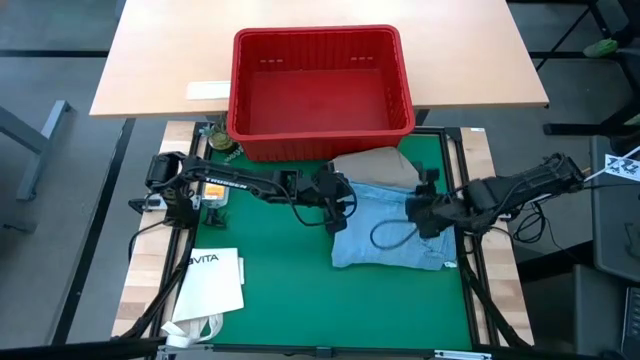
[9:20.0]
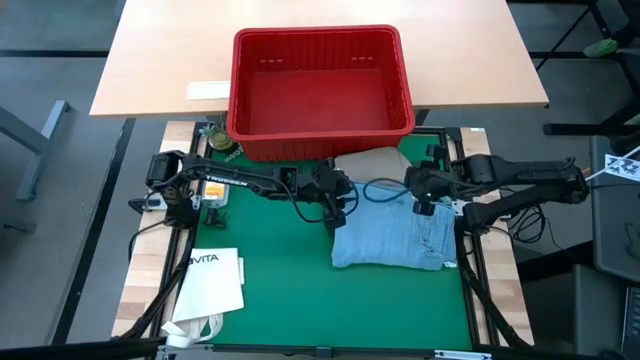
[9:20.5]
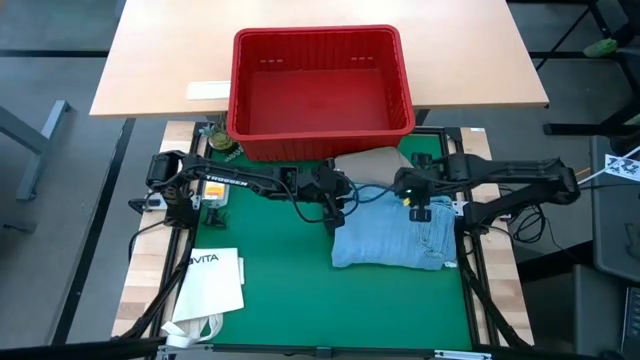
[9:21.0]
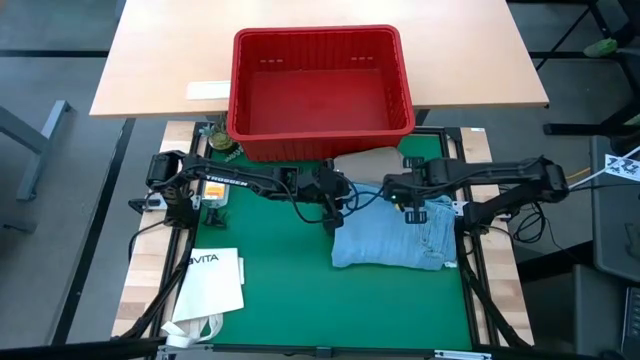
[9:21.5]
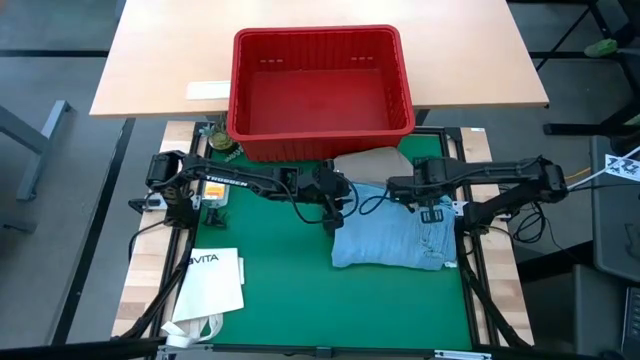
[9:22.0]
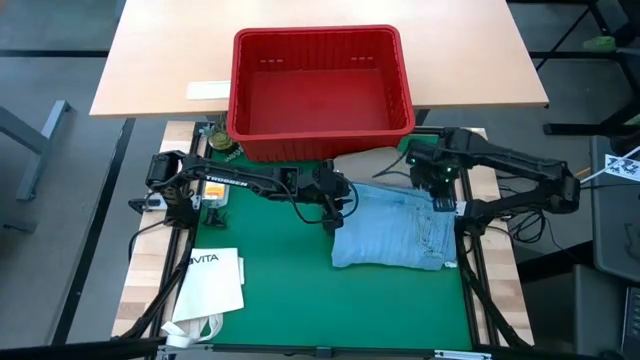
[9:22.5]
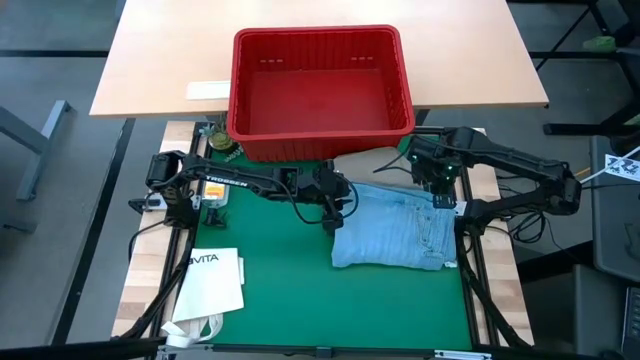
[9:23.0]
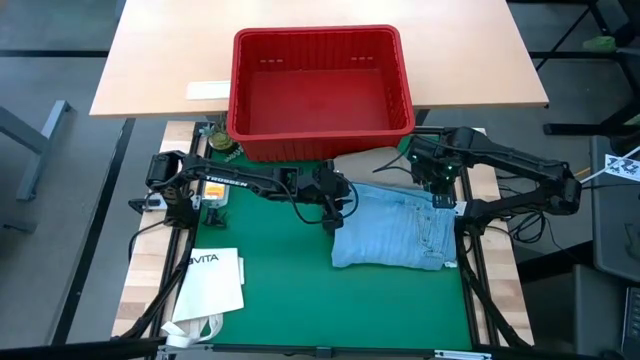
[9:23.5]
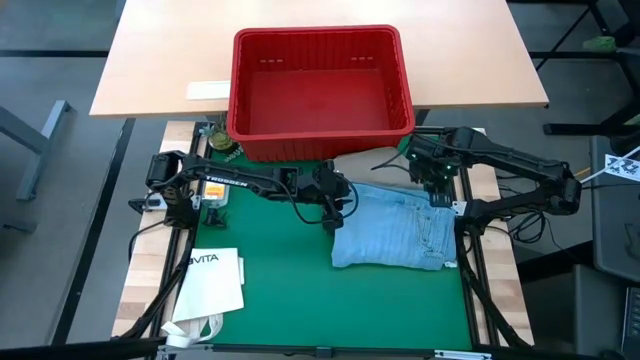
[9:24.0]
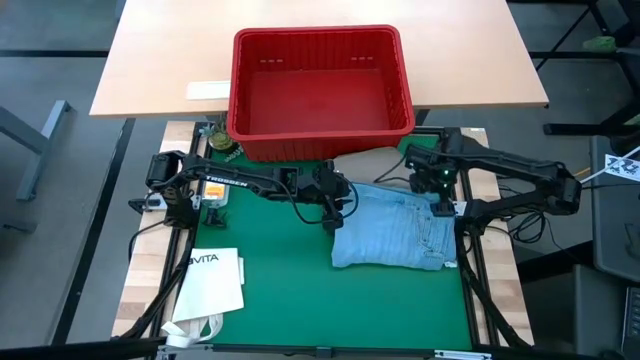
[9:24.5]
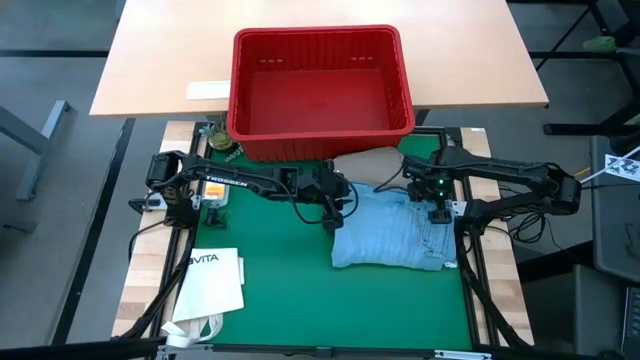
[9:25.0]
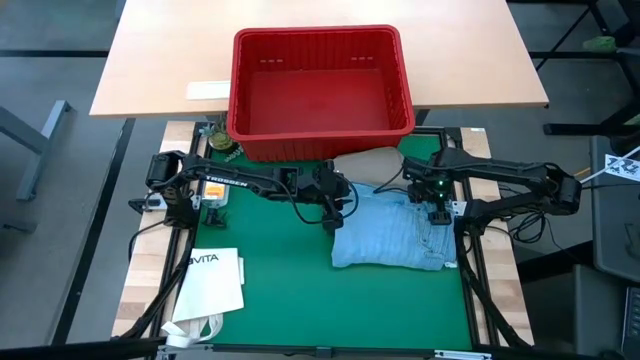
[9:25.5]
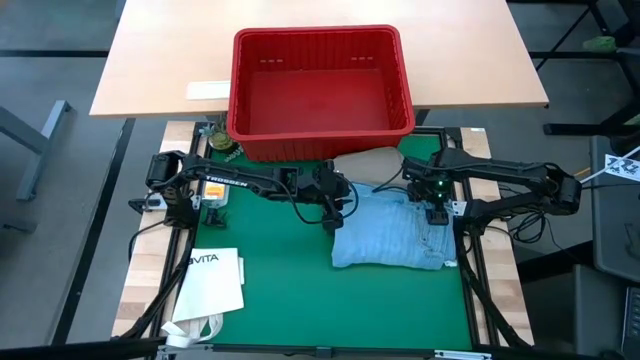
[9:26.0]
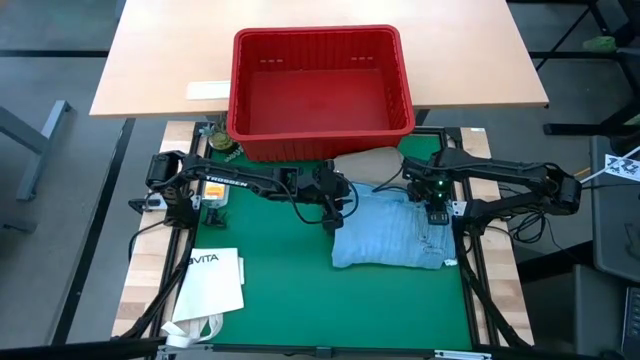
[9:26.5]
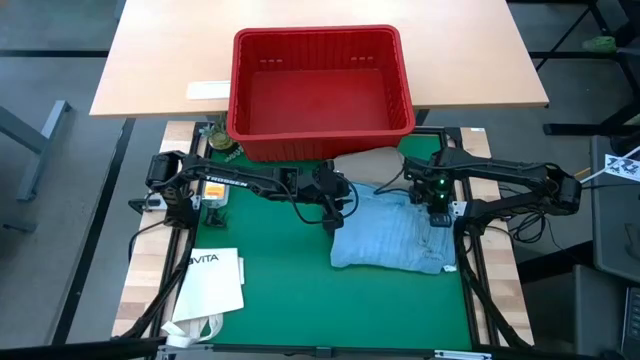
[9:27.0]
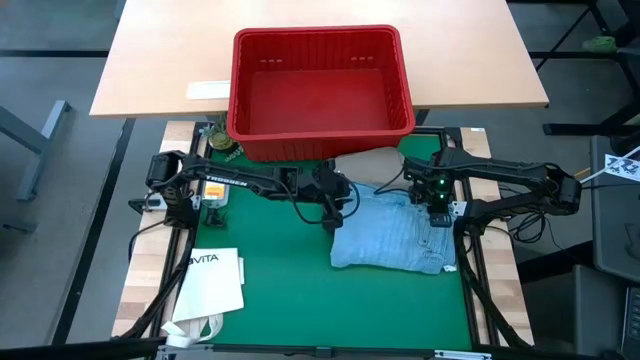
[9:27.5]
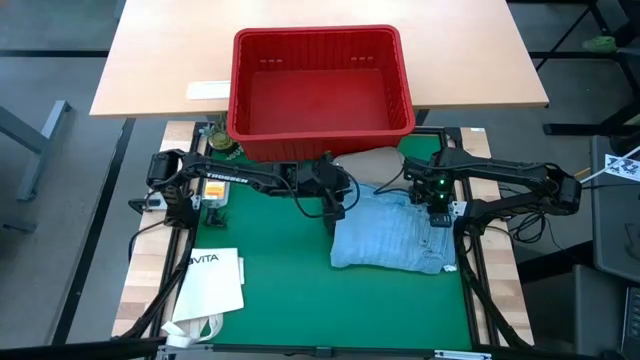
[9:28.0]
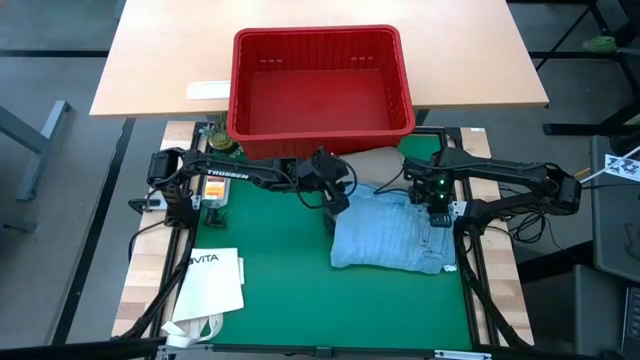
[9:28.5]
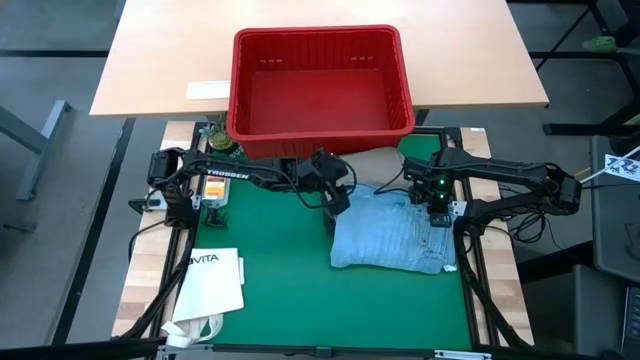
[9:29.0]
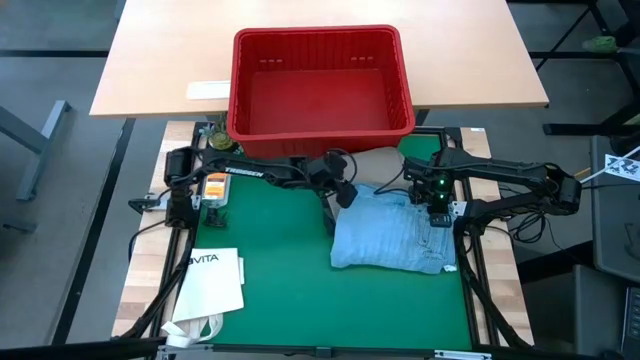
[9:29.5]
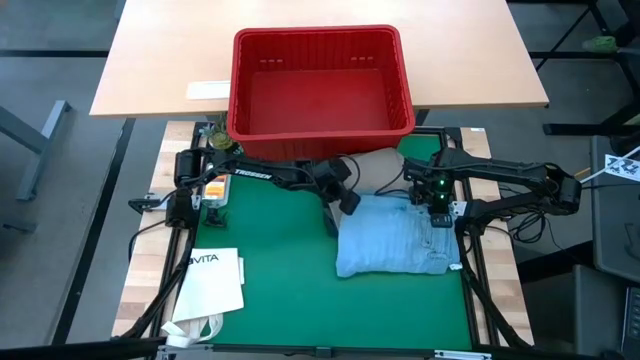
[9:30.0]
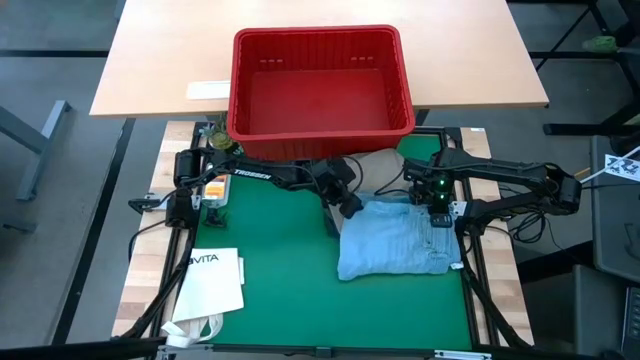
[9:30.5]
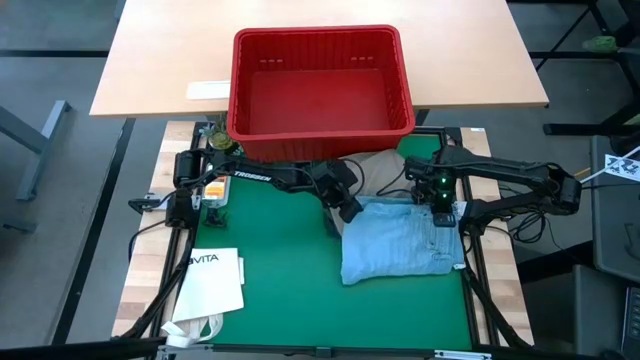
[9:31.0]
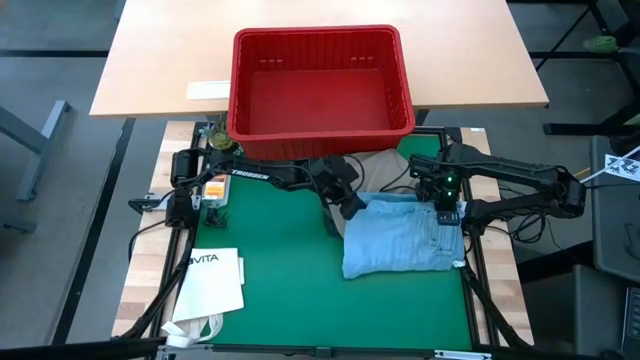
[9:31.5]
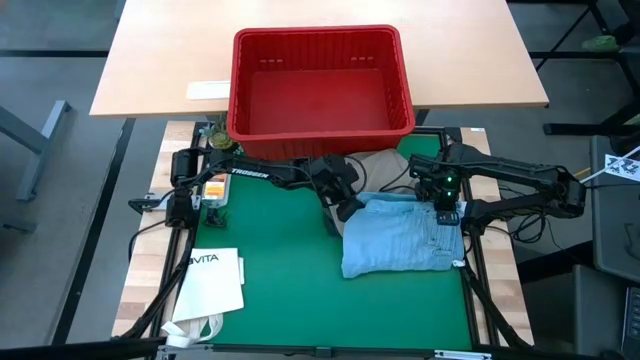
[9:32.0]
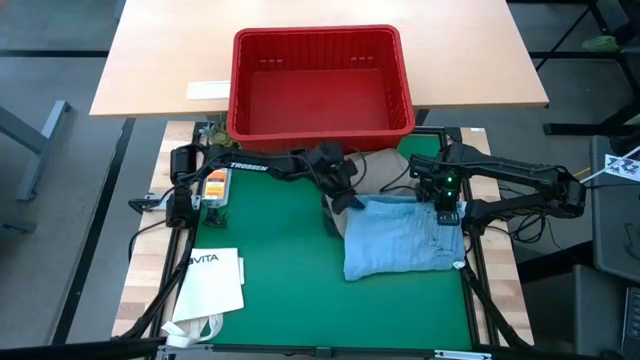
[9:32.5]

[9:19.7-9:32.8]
Task: Fold Laundry from Bin
Stack the light blue pants on top of the gray shorts

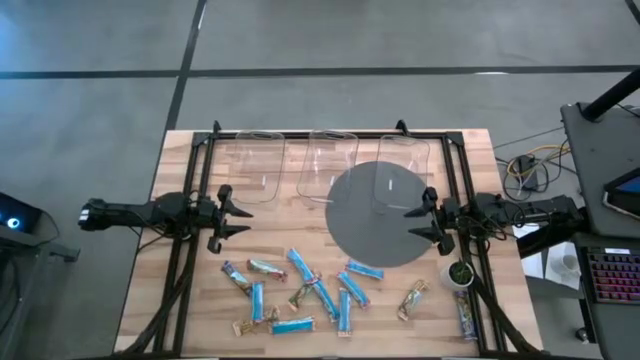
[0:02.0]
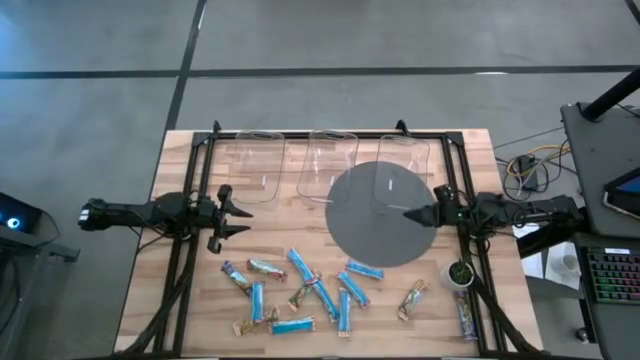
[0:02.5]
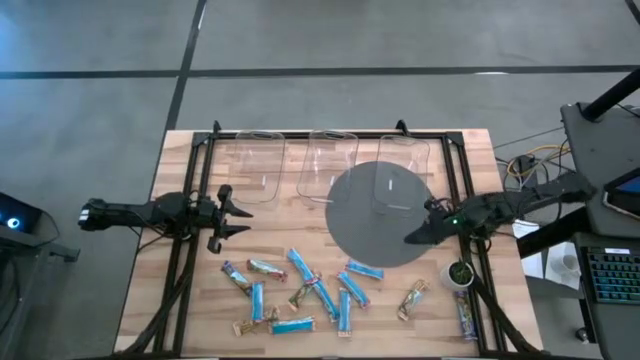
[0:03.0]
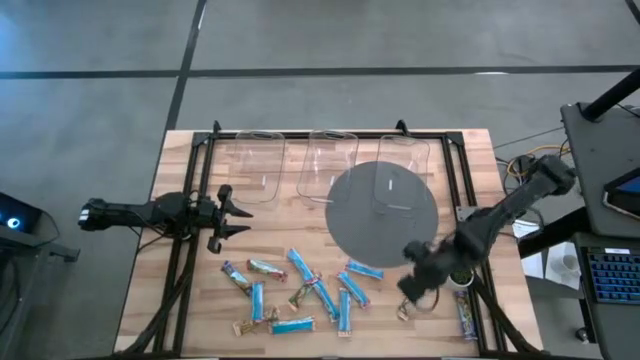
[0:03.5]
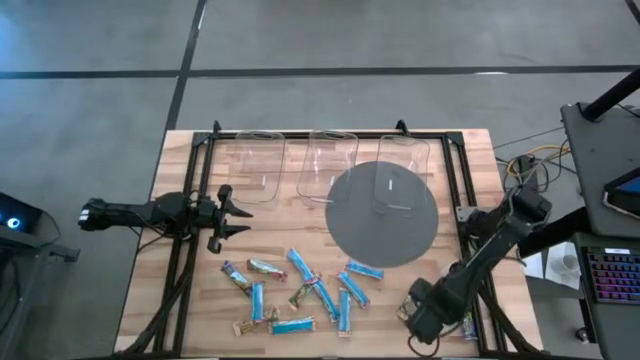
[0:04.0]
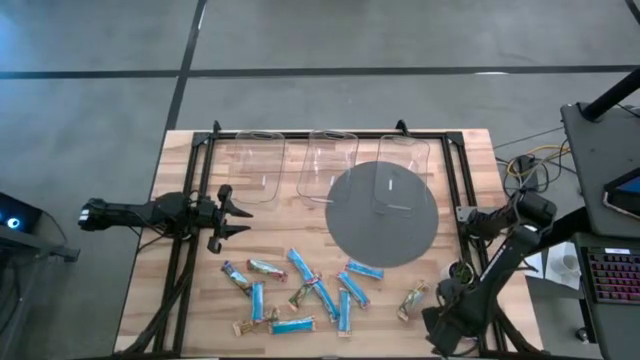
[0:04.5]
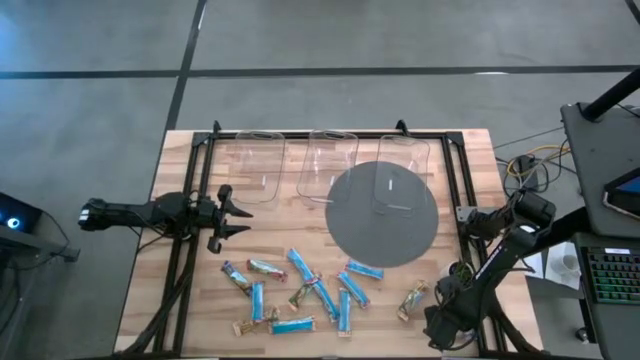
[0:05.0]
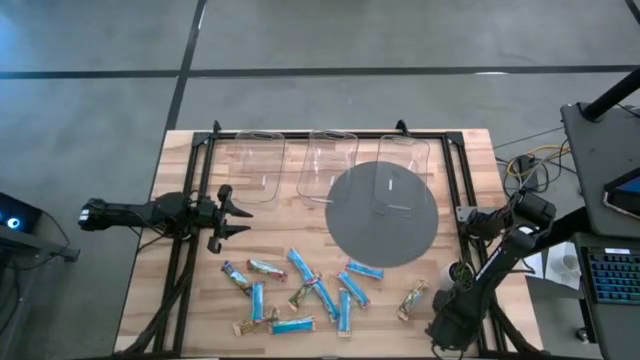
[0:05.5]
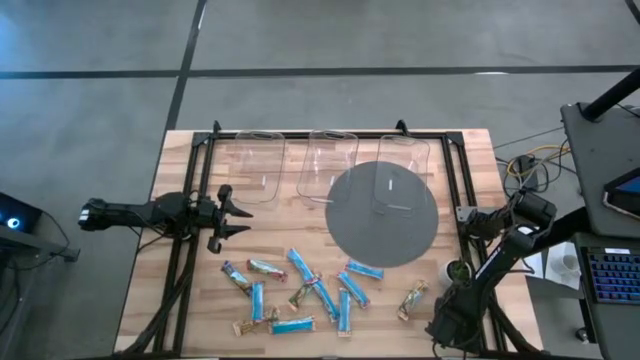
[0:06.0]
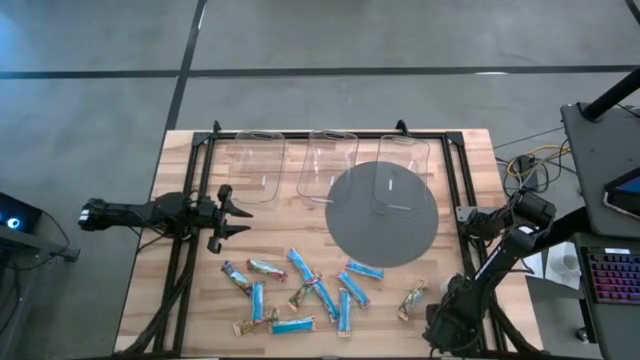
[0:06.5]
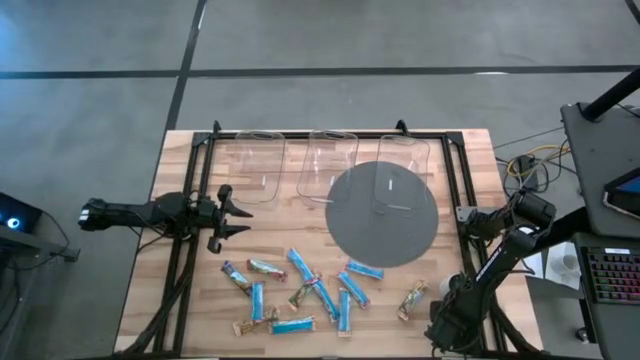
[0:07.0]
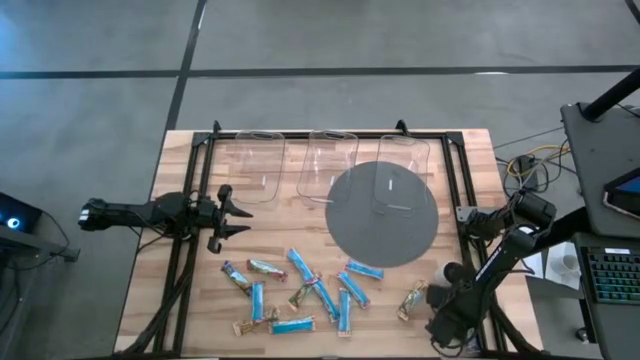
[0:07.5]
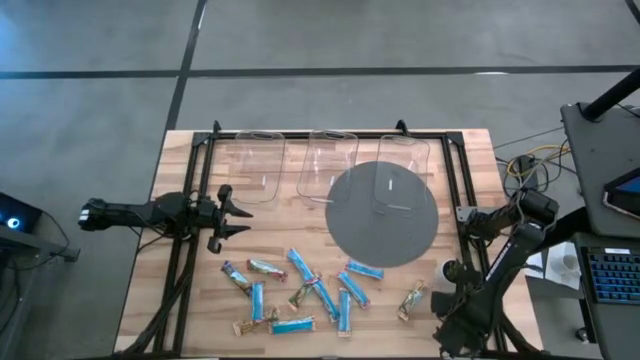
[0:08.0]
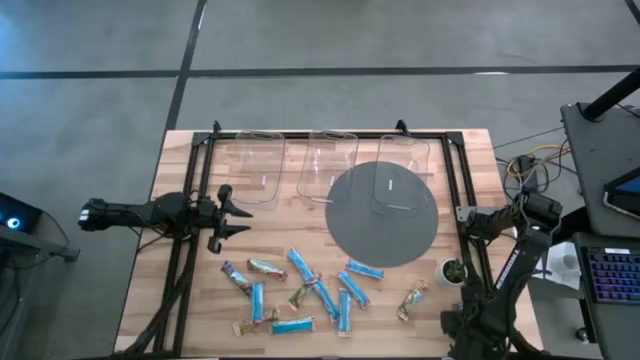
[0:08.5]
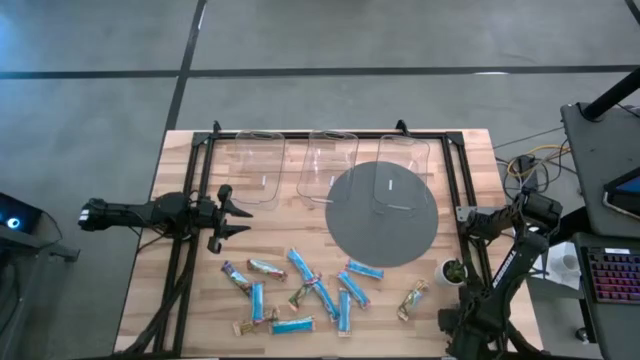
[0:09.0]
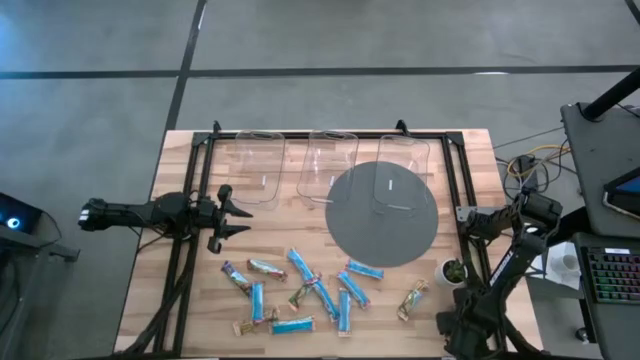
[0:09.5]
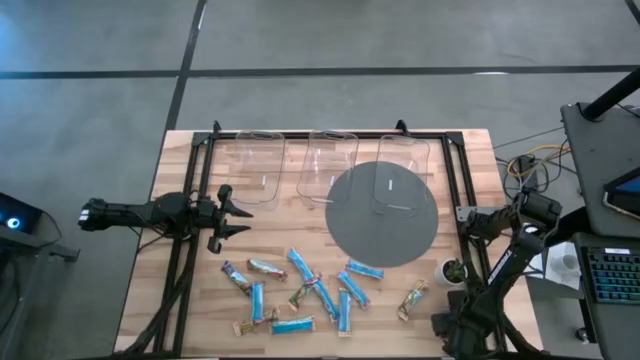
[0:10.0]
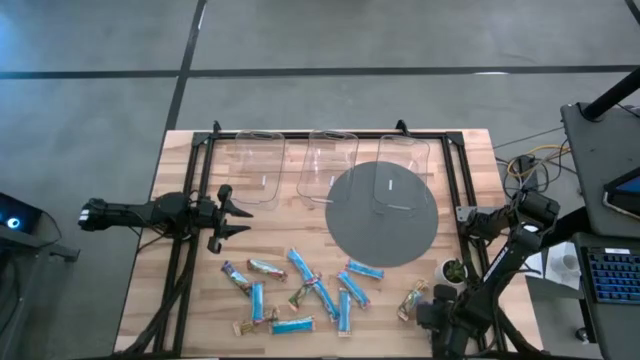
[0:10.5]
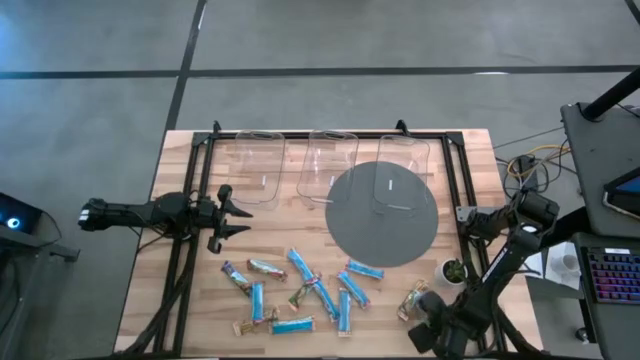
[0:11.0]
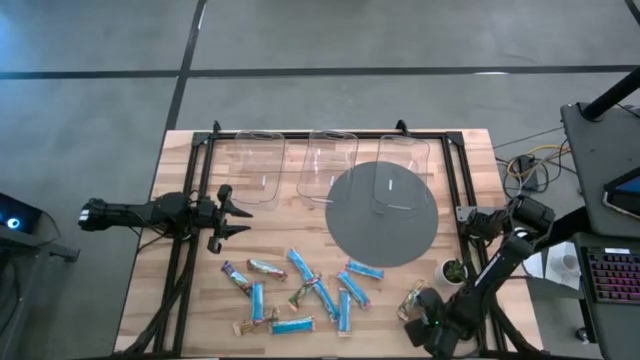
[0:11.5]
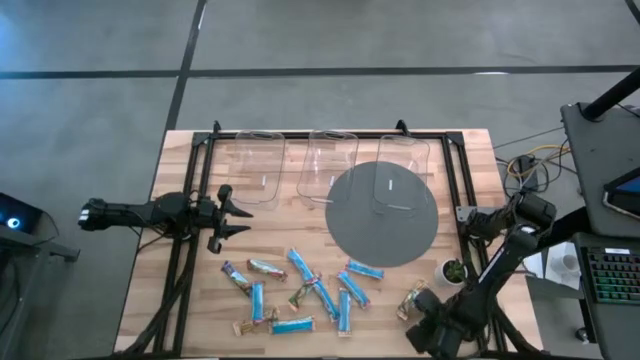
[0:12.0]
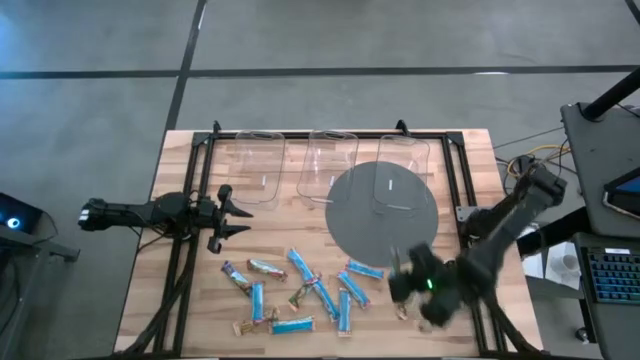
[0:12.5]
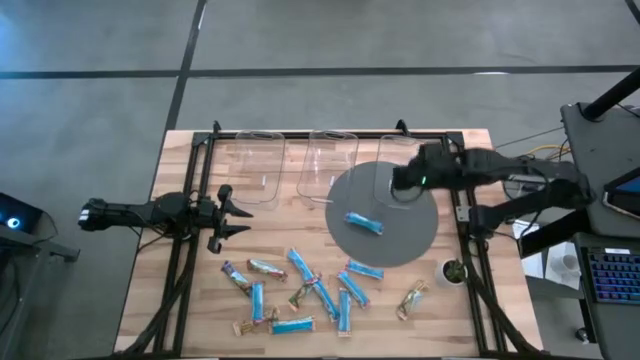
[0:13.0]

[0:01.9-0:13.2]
Task: Pick and place Granola Bars by type
Put the blue granola bar into the right transparent bin
